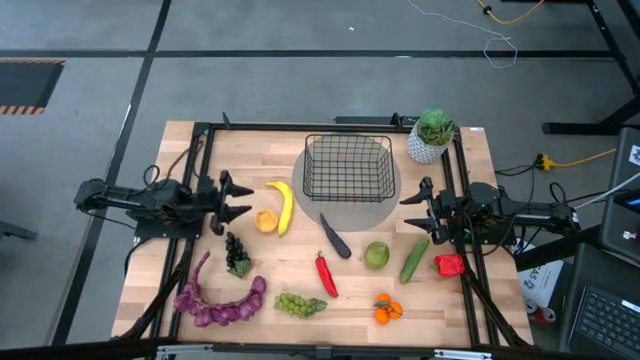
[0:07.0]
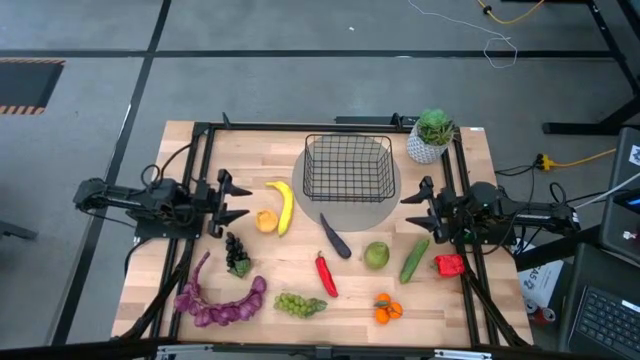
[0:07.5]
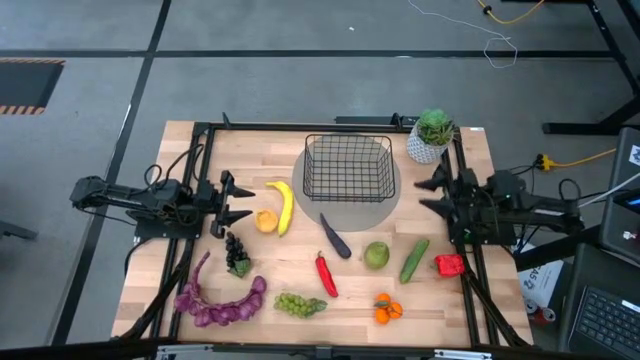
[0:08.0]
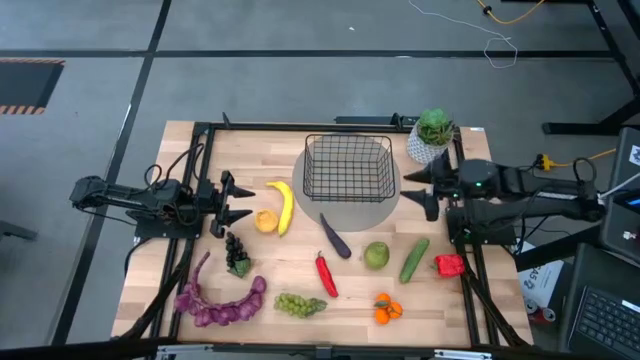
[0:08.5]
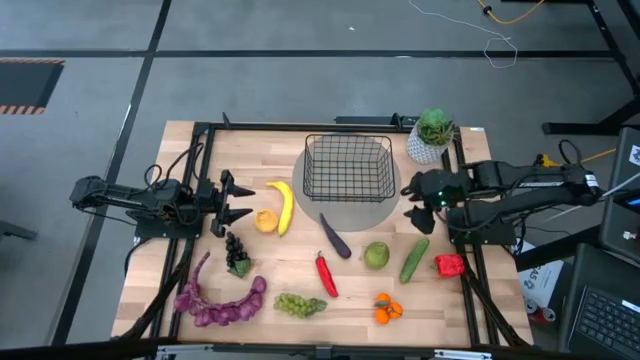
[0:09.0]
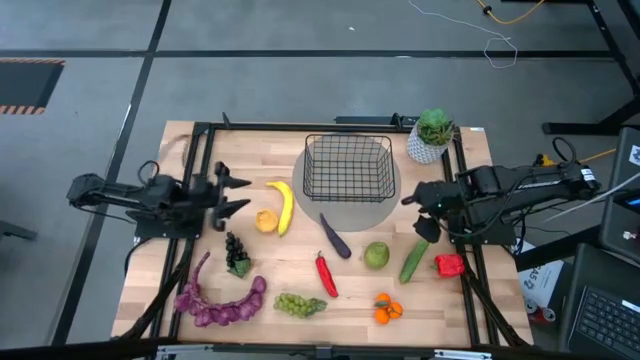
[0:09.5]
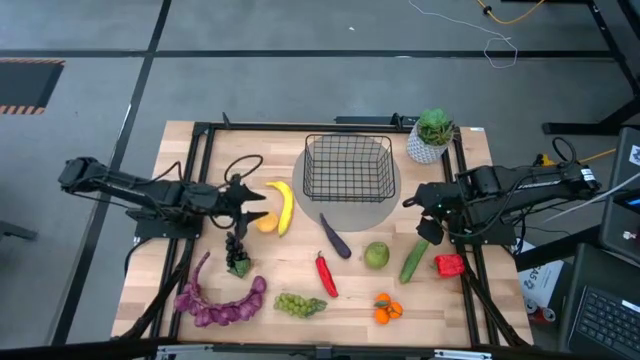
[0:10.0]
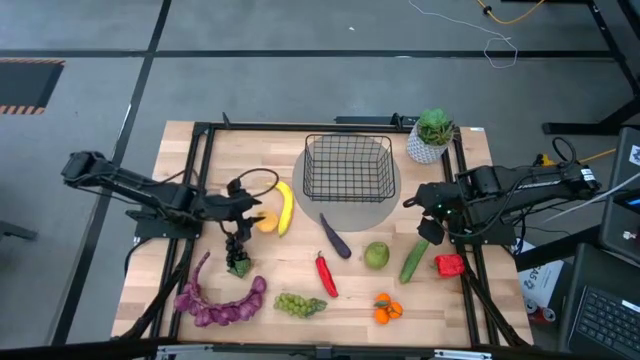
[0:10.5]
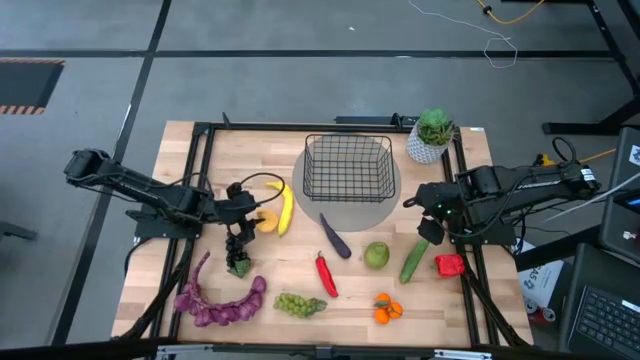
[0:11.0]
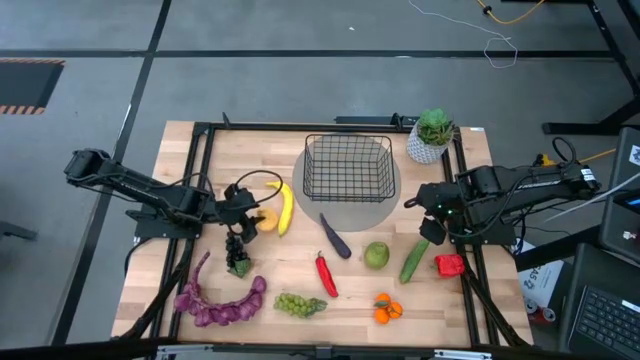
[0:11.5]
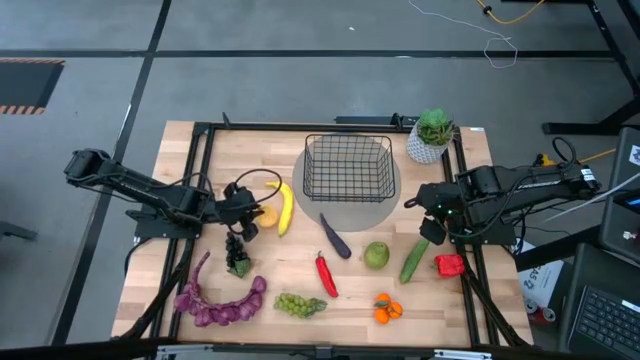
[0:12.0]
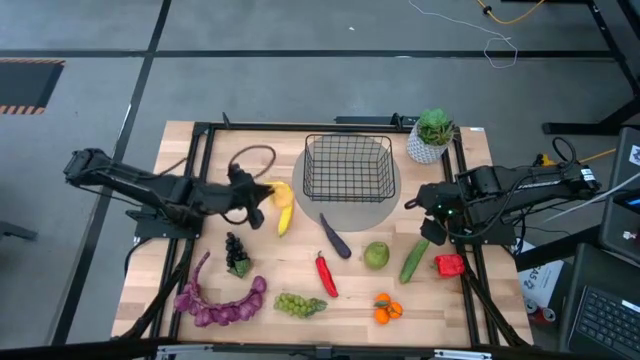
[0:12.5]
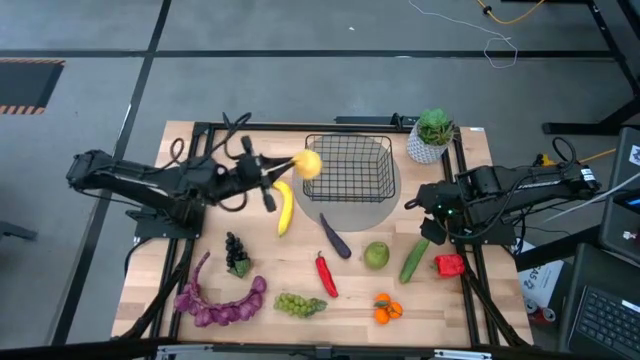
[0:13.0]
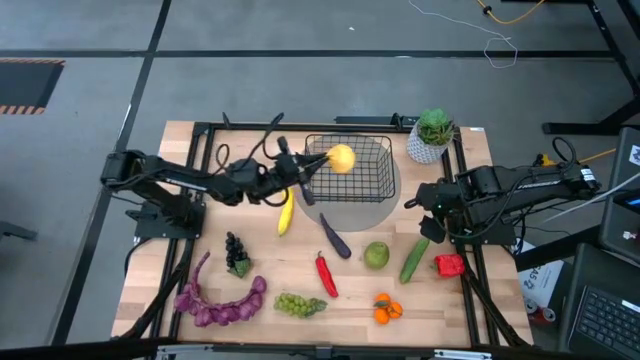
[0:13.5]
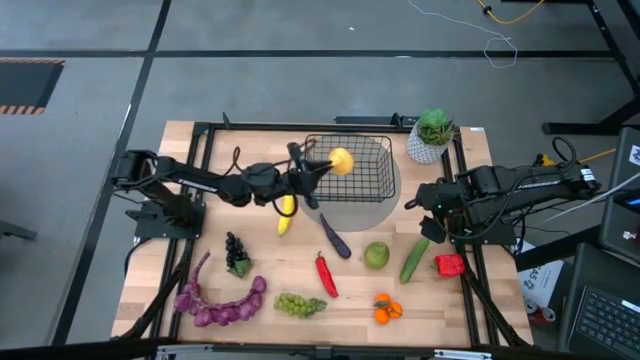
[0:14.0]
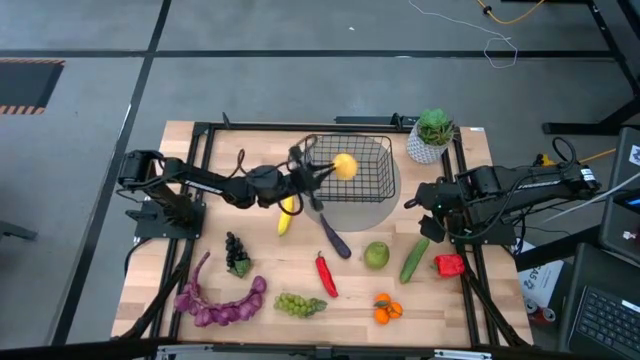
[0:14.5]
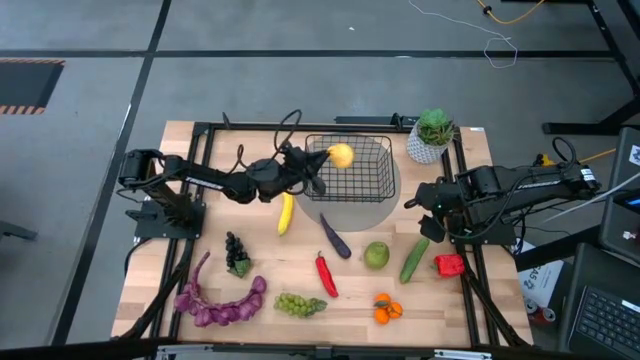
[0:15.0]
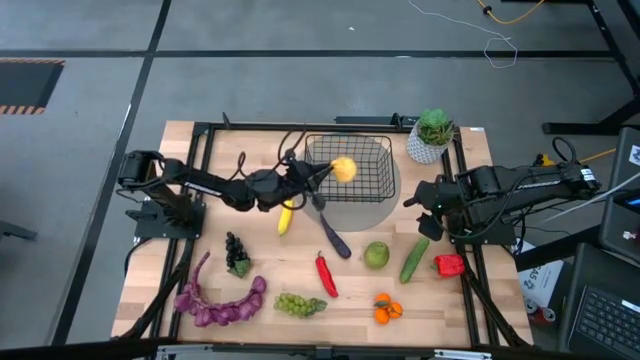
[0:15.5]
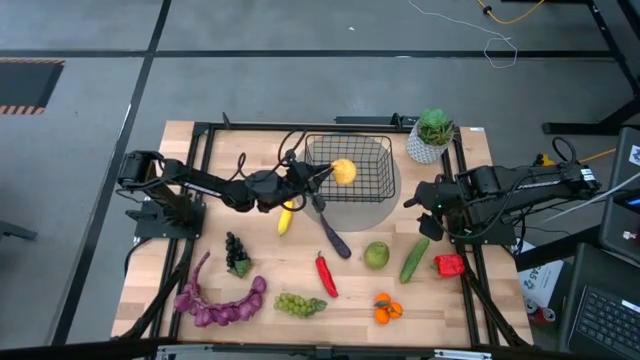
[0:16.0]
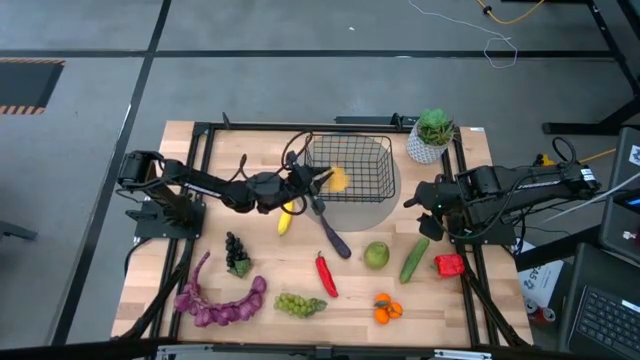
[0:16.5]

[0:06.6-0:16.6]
Task: Build produce basket
Put the yellow pear into the black wire basket

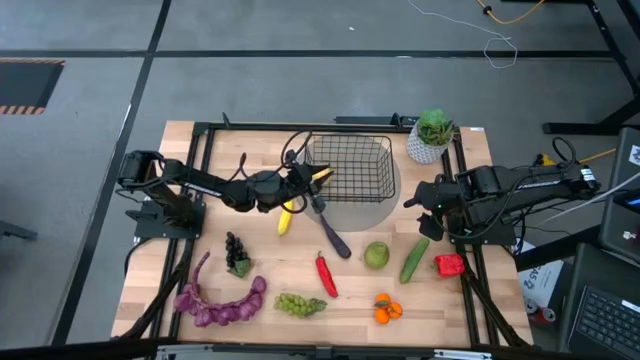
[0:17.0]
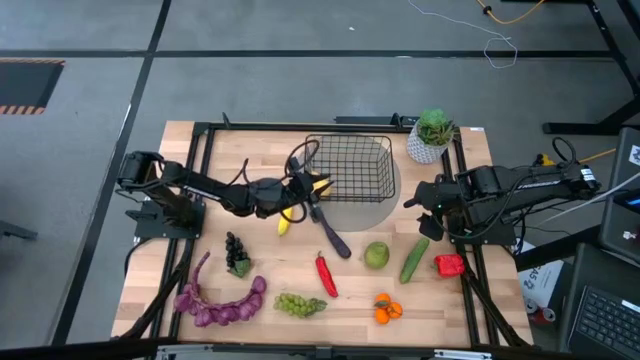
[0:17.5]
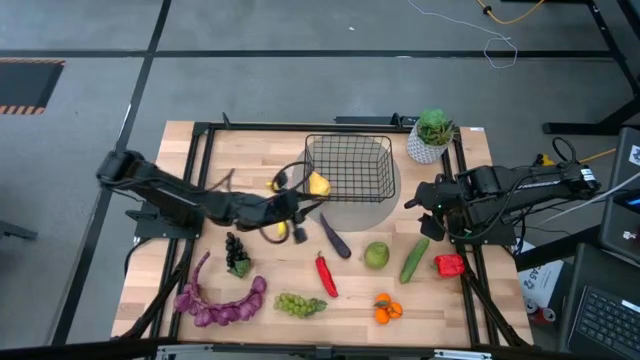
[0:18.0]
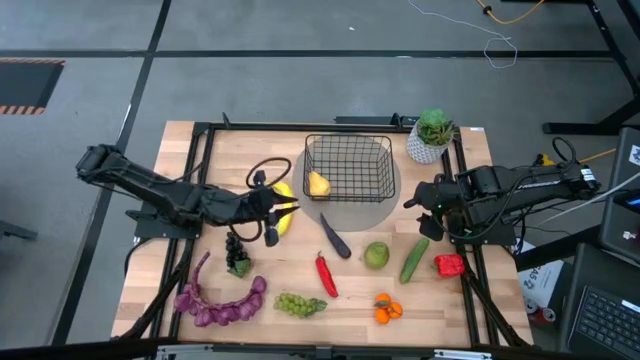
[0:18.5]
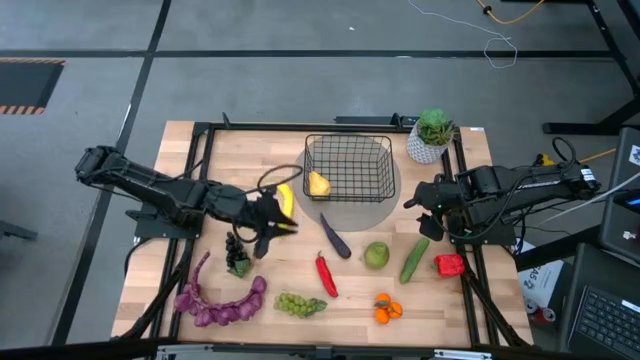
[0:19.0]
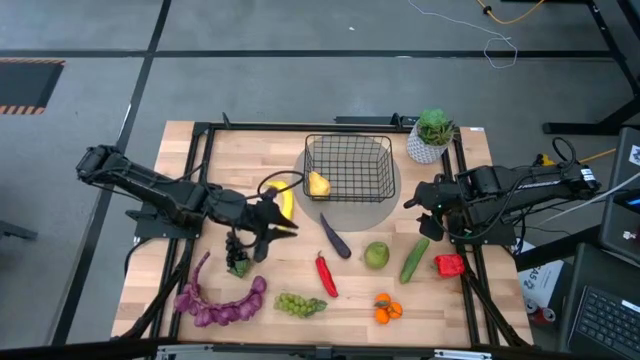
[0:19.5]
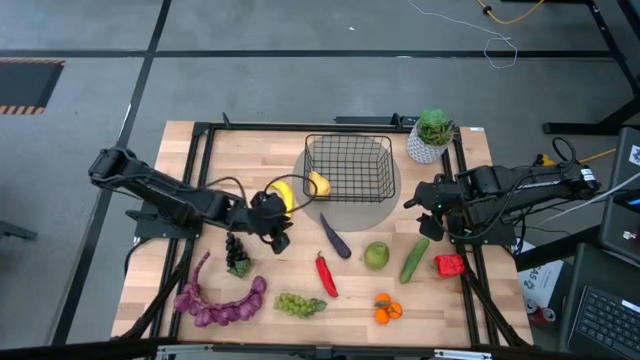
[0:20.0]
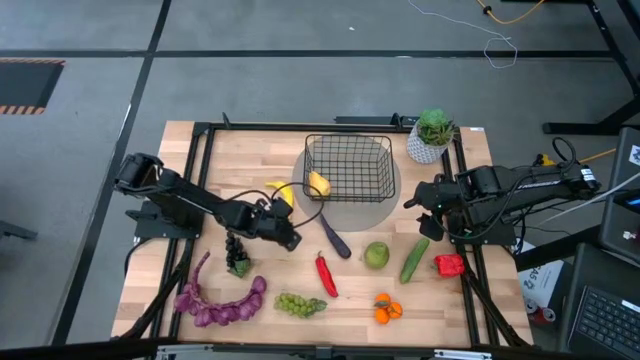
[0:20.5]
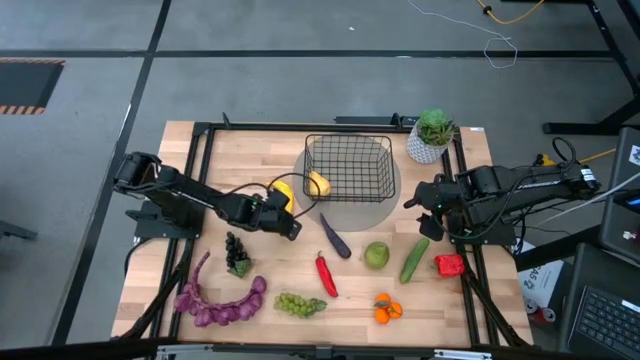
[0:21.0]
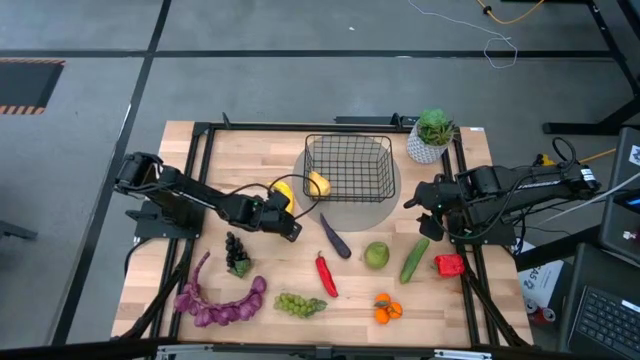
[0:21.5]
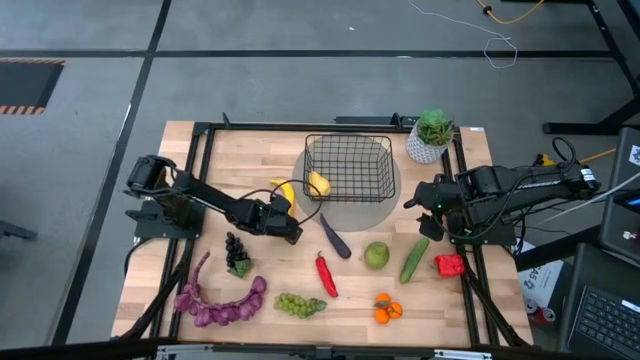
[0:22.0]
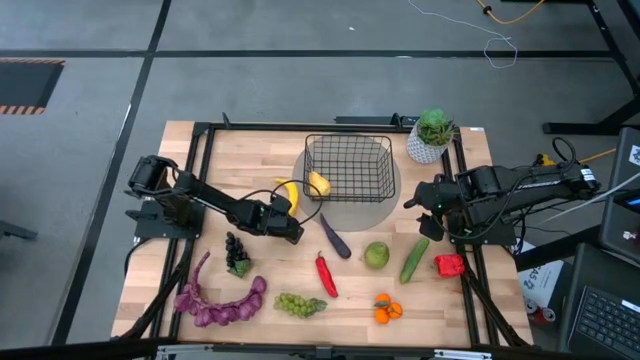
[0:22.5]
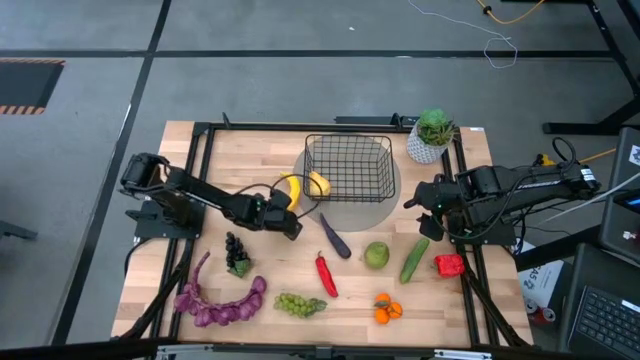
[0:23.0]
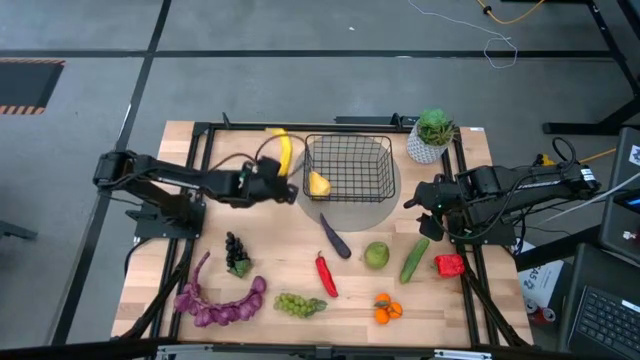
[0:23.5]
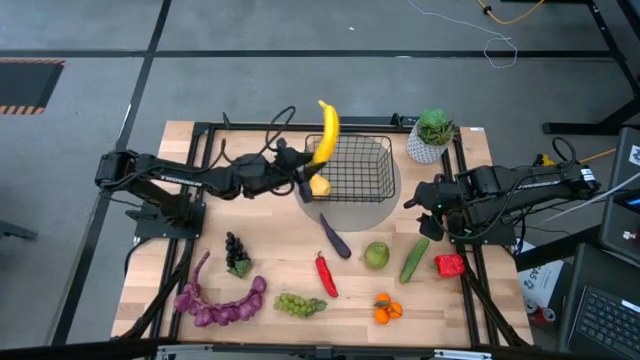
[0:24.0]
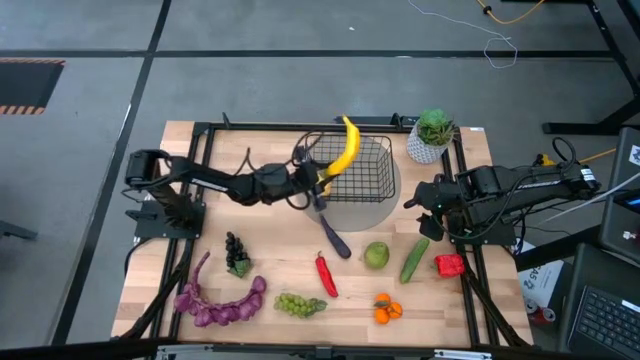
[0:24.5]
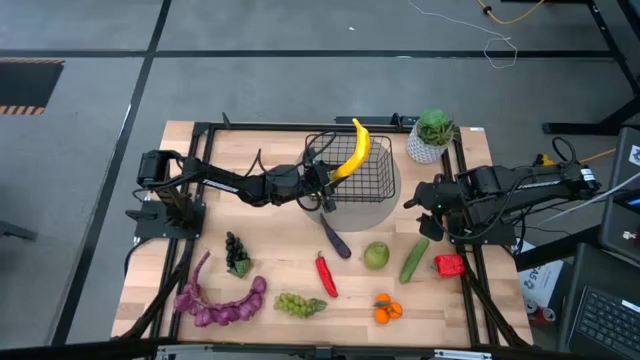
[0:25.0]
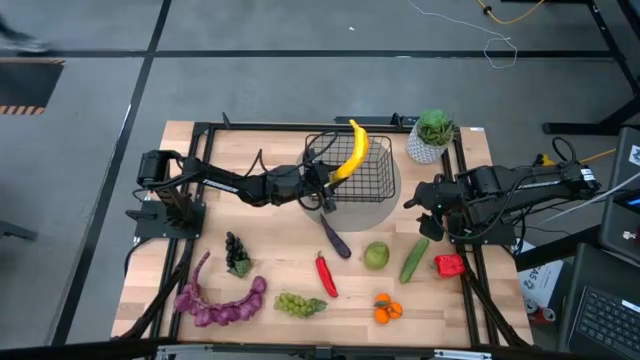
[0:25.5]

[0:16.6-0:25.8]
Put the yellow banana into the black wire basket

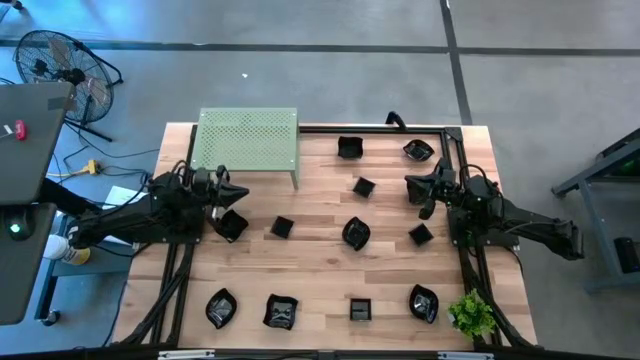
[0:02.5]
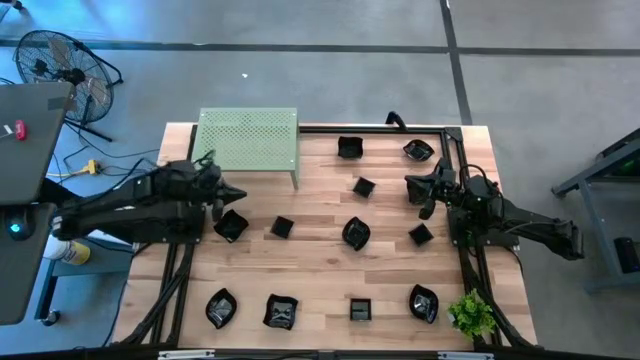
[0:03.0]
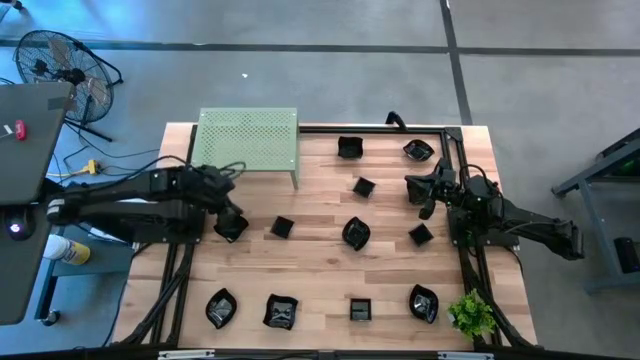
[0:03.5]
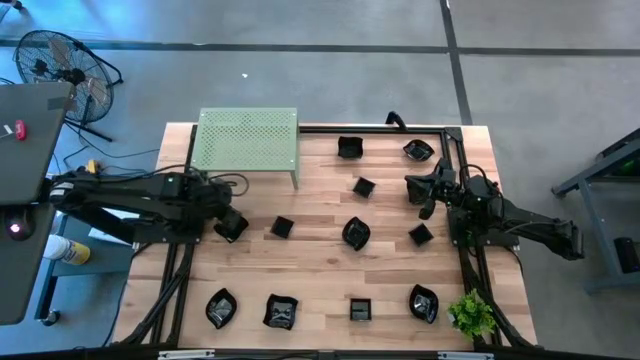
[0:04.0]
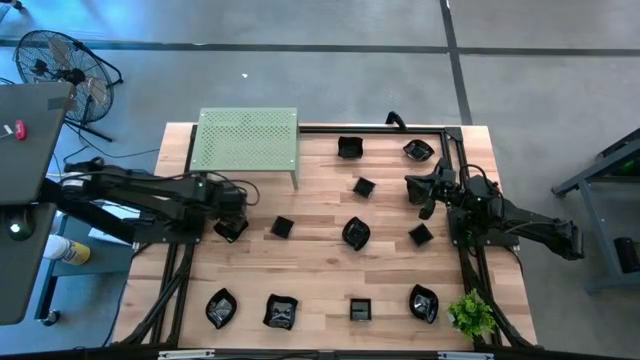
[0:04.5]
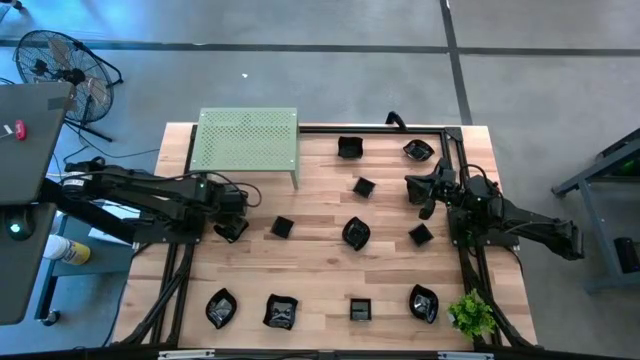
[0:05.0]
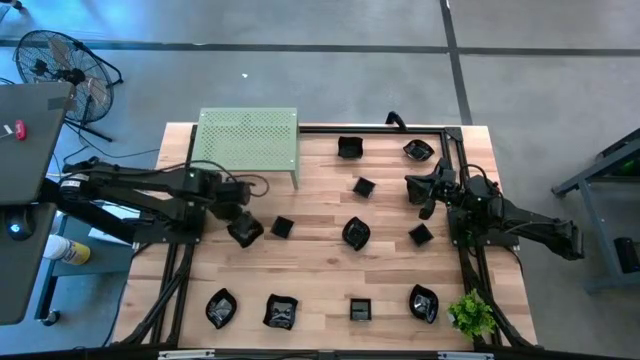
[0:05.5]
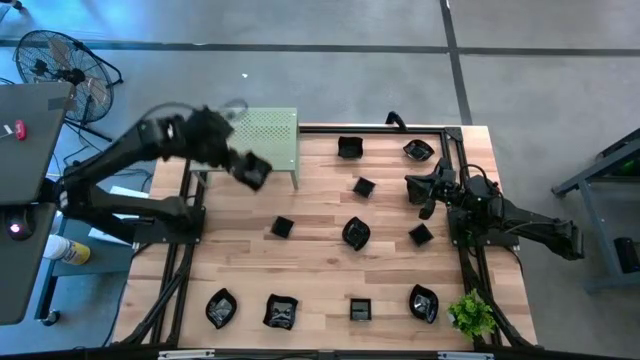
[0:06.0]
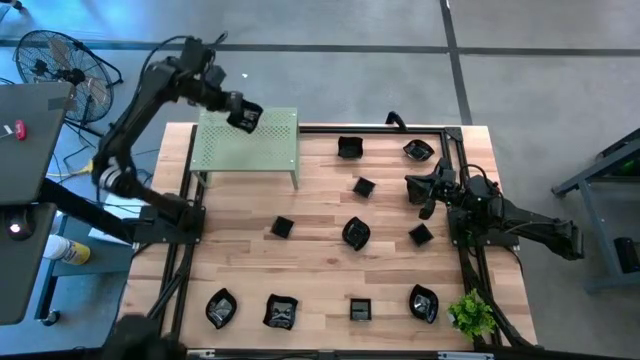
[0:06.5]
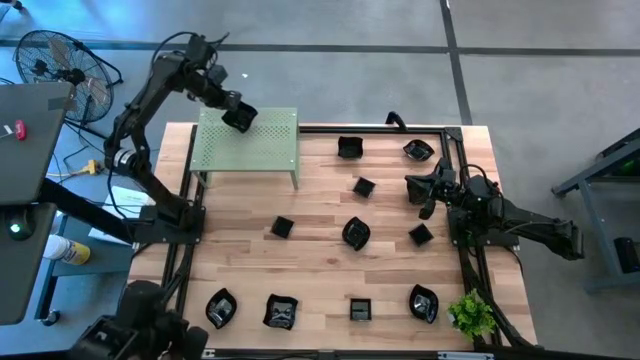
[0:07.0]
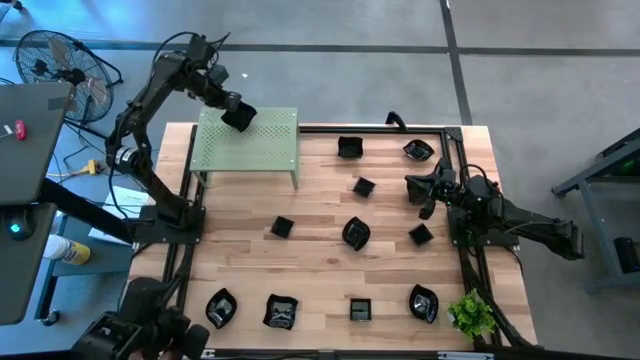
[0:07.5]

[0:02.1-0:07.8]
Task: Pick & Place Mini shaped plates
Put the black distorted square plate on the shelf
